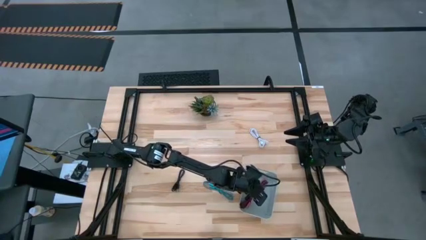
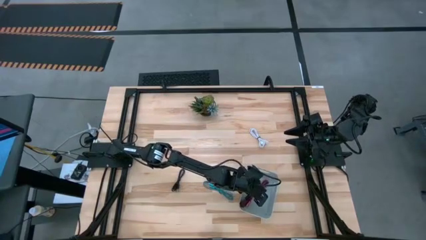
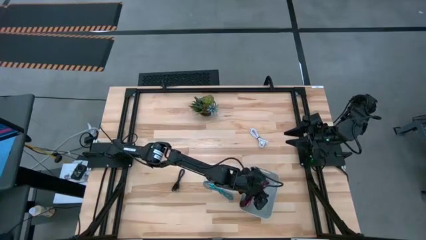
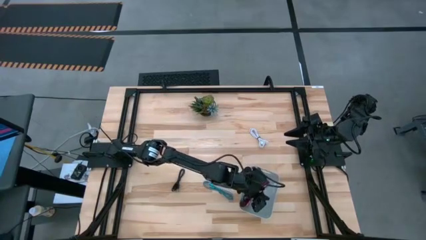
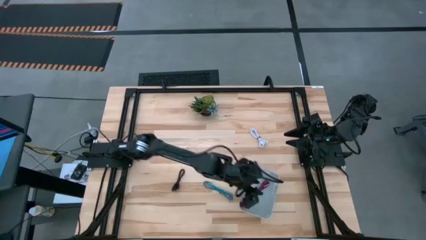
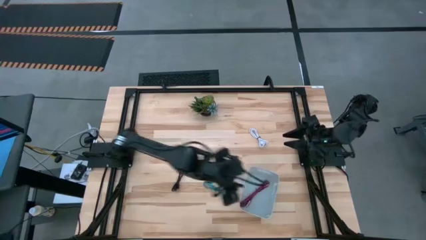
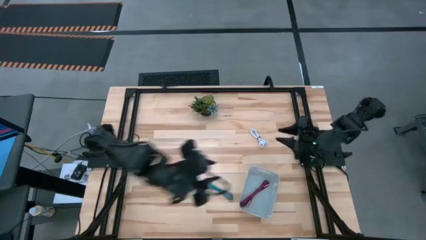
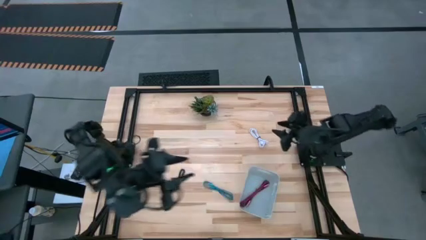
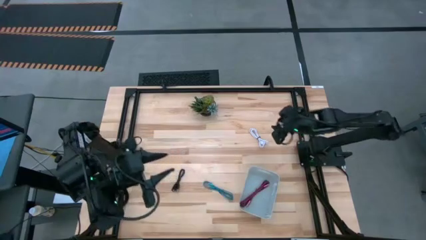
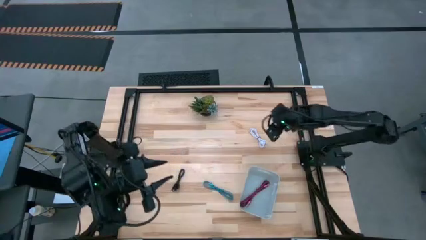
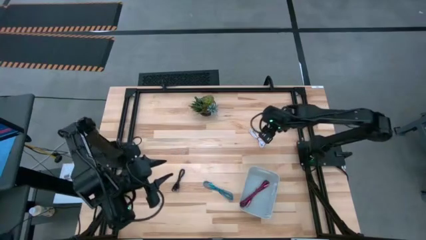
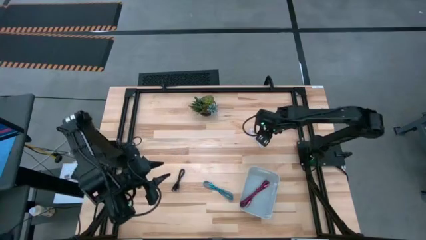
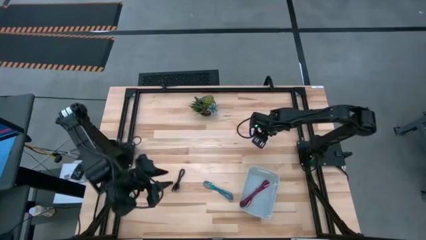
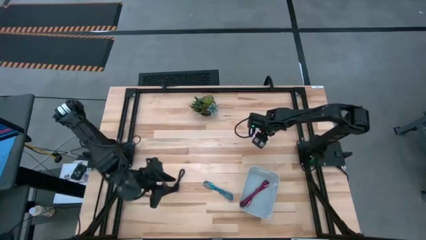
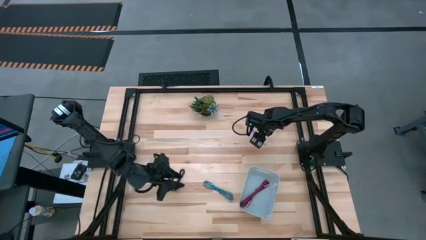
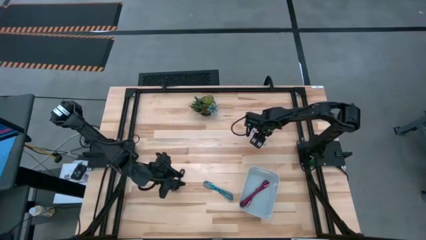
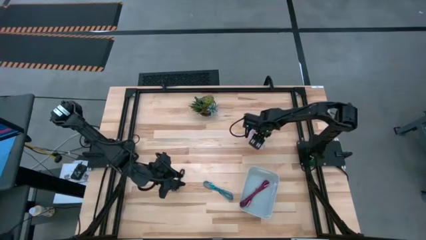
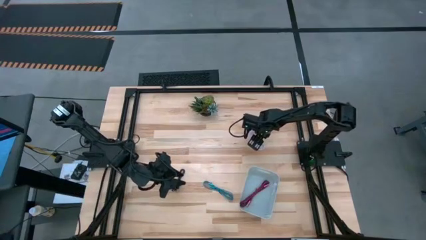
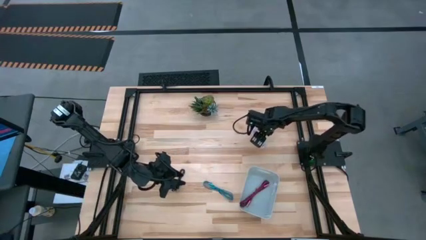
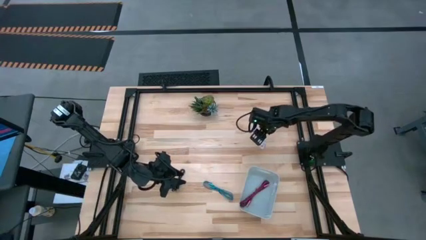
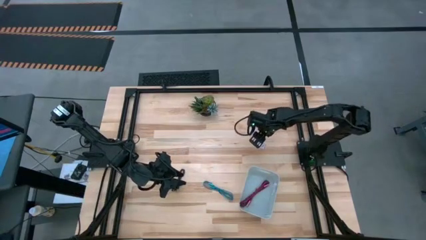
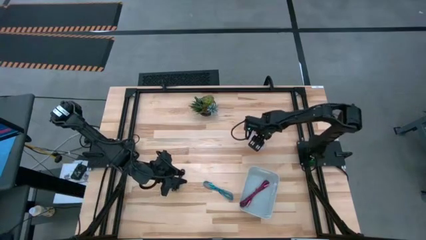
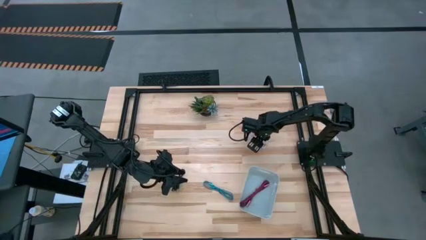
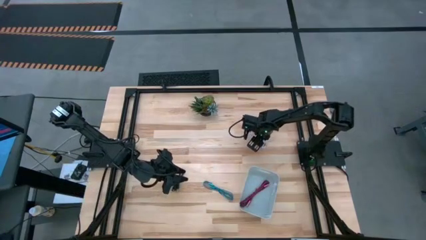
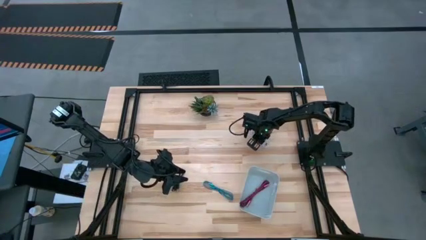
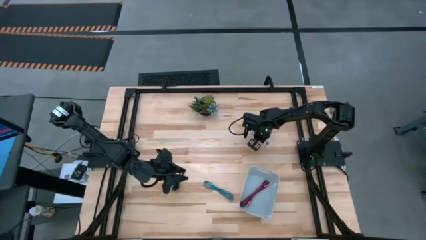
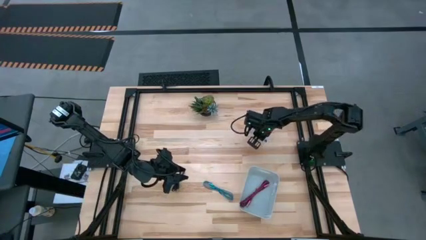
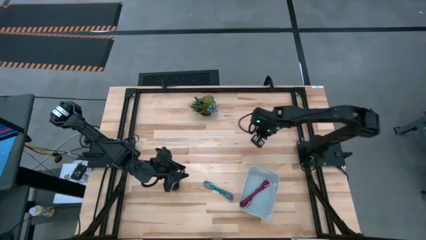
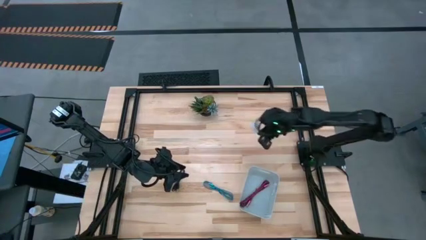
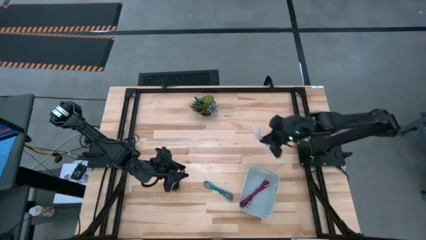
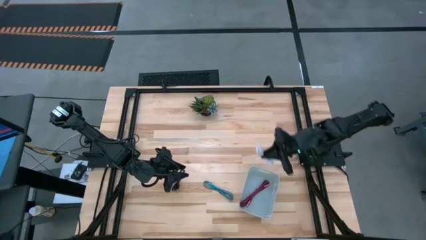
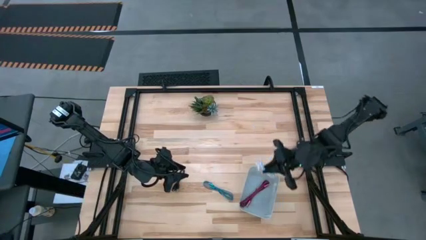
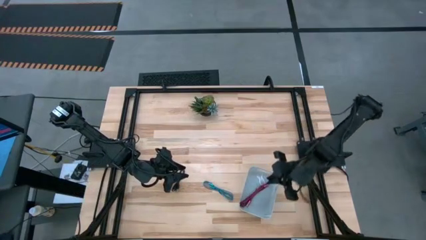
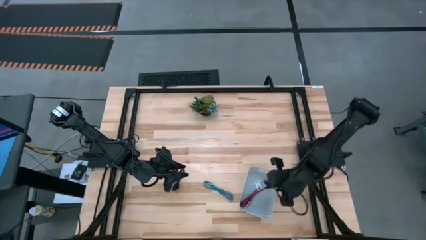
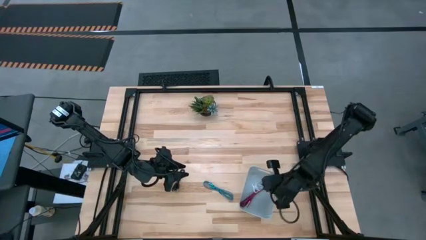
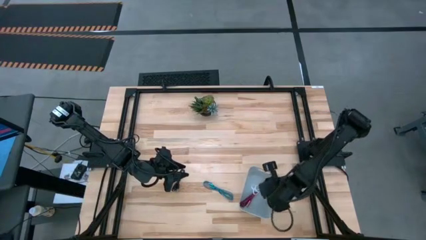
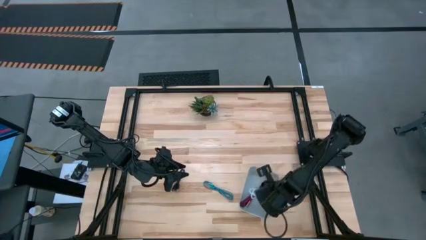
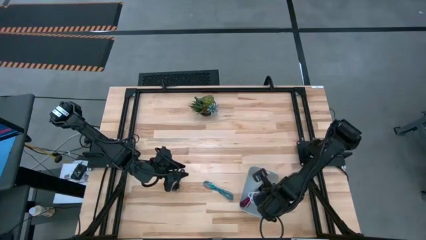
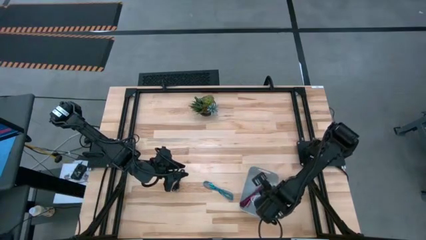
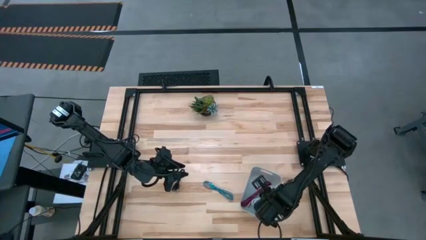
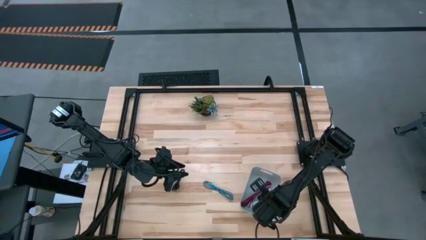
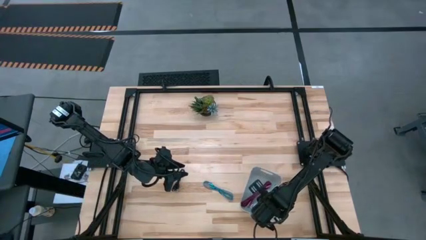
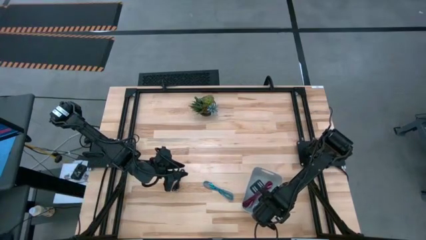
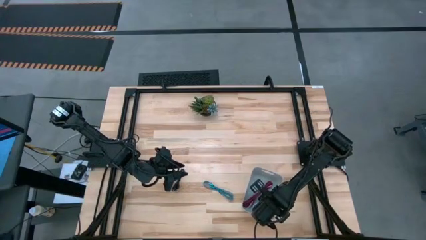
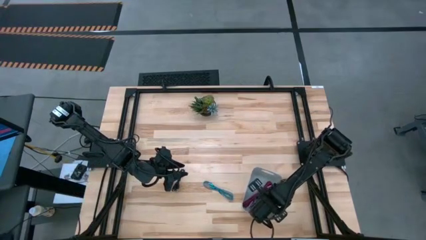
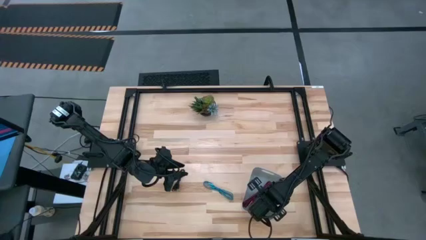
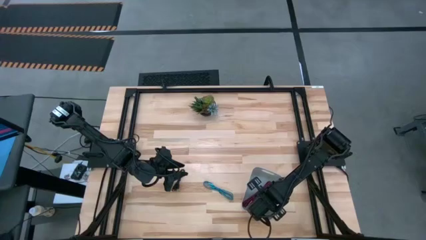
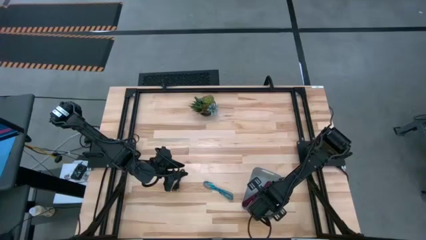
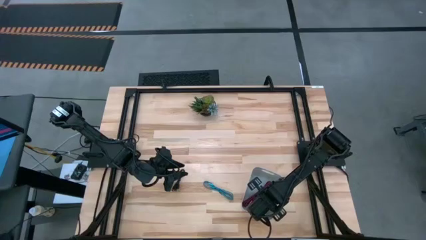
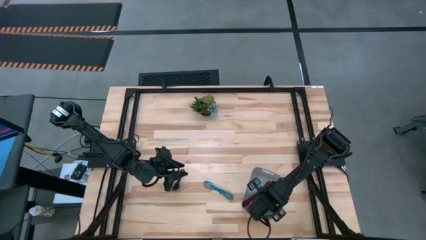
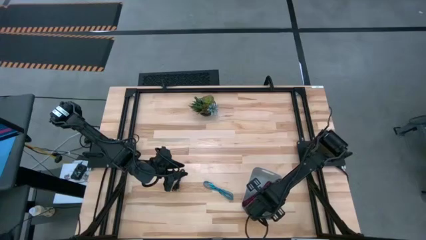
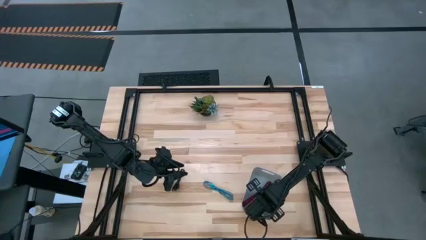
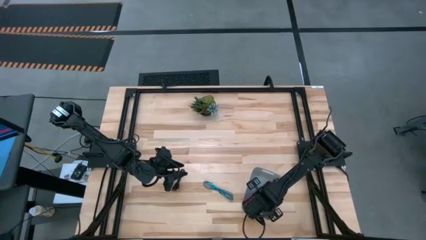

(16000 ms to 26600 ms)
Task: Pick and place USB-C Cables
Put the white charger cable into the white bin

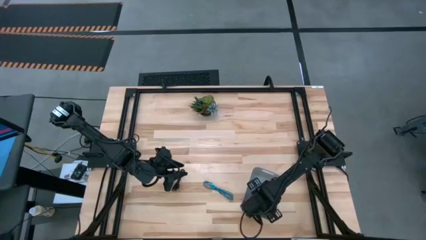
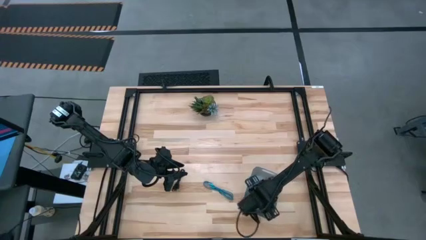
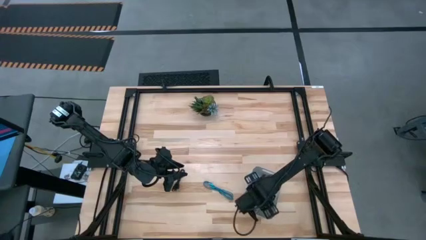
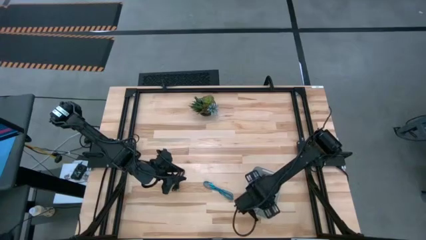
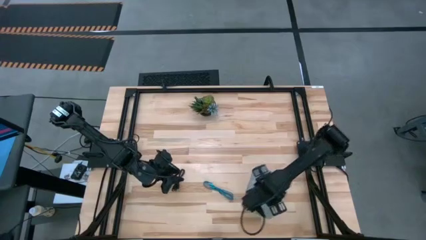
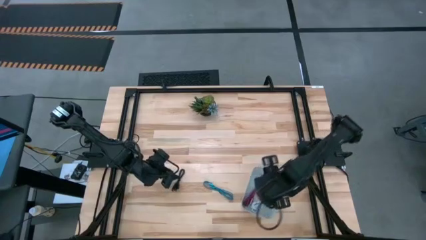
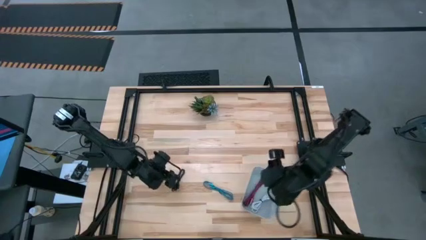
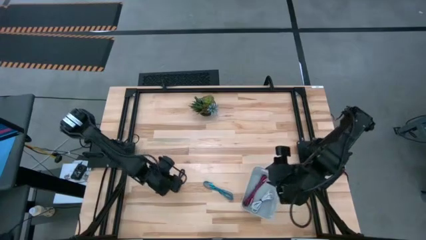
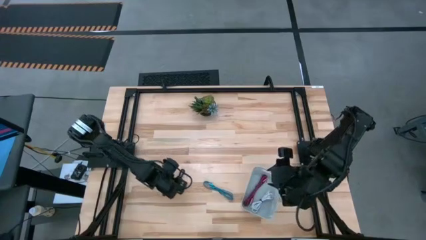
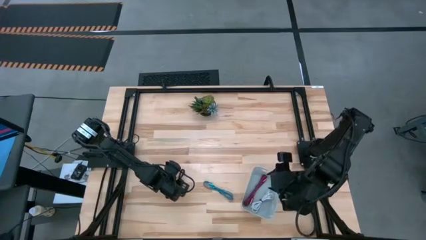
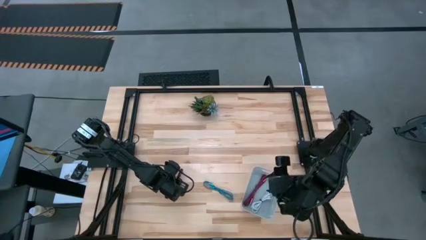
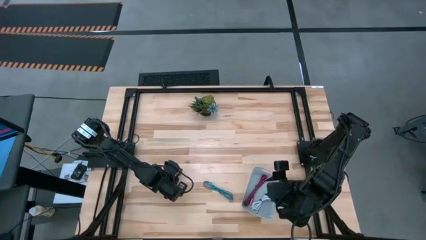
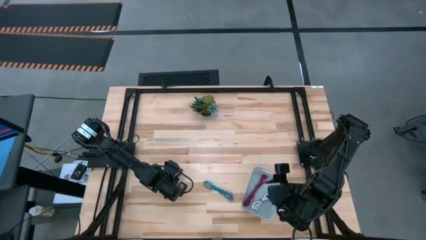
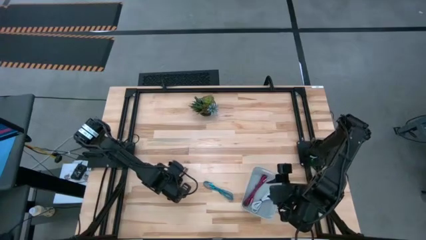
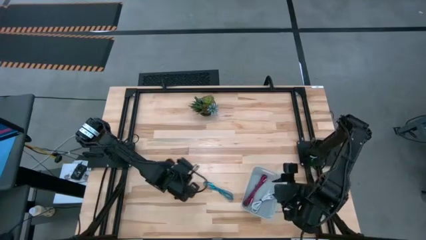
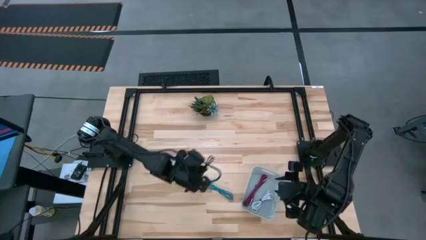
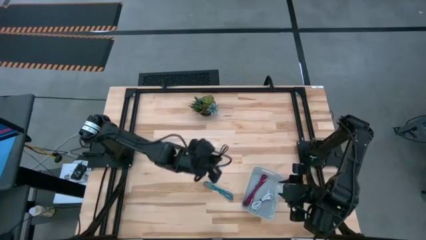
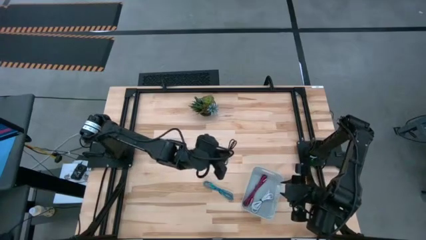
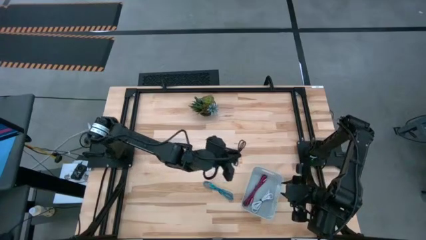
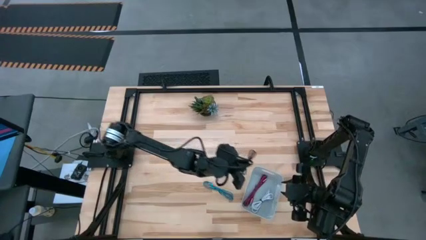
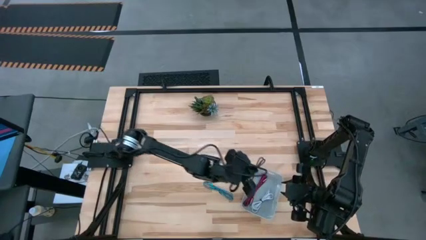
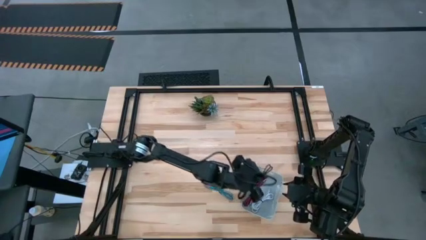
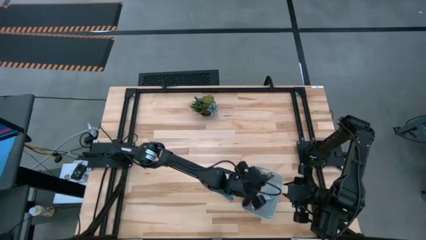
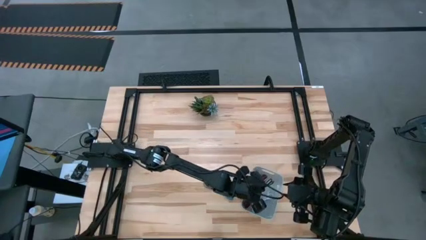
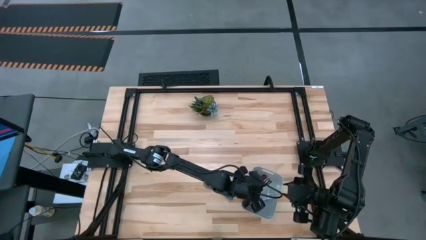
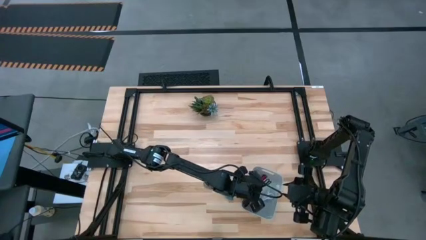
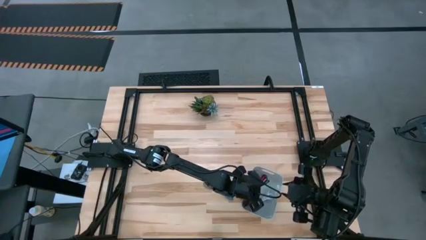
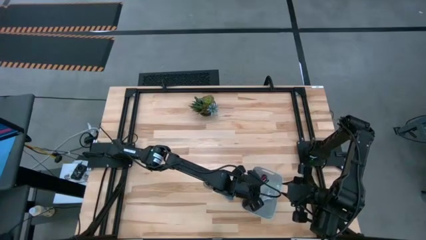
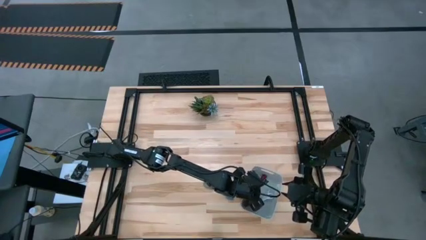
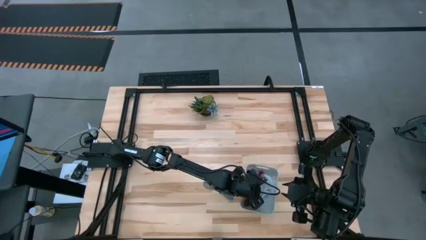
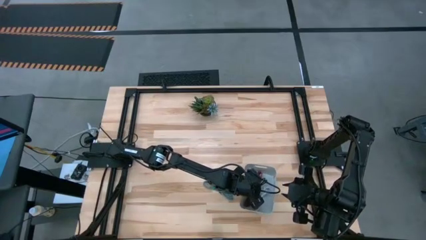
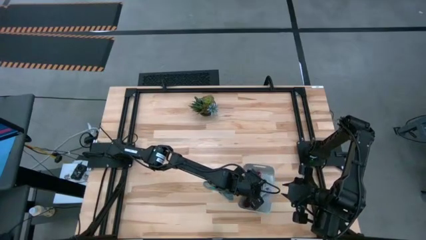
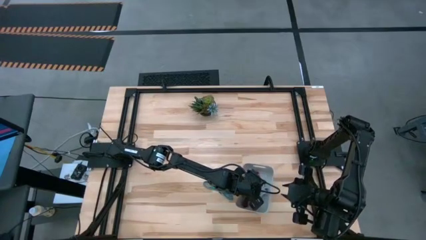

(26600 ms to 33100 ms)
Put the black charger cable into the white bin

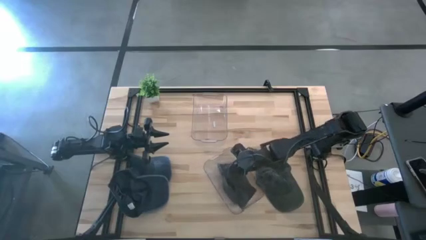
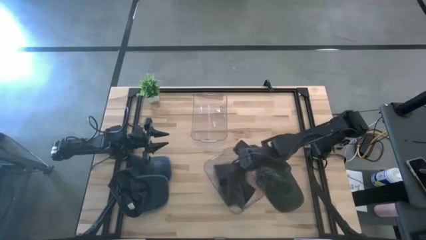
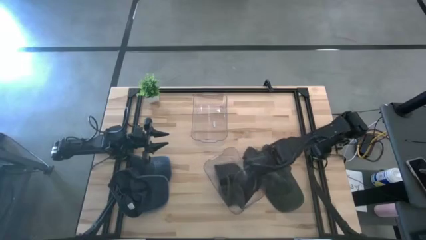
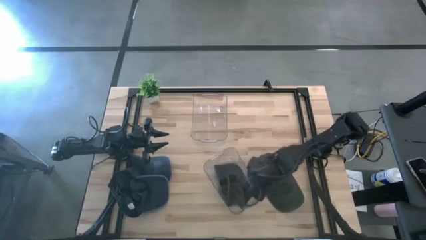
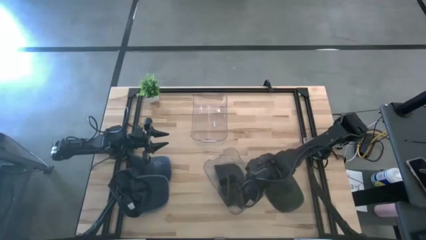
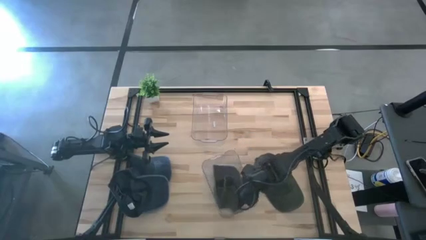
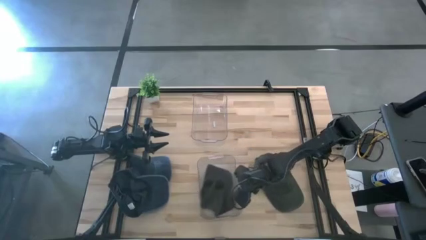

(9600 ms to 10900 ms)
Task: Pick & Place hat
Adjust the bottom transparent bin
